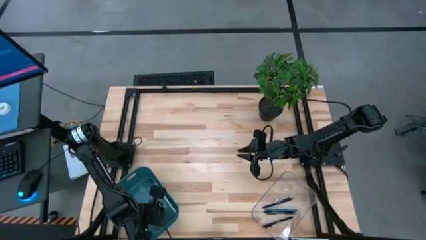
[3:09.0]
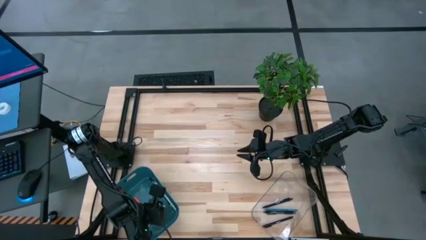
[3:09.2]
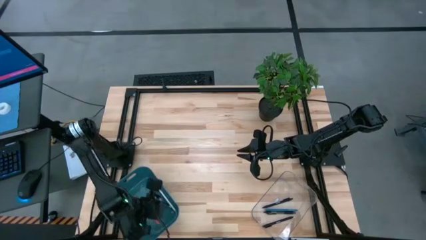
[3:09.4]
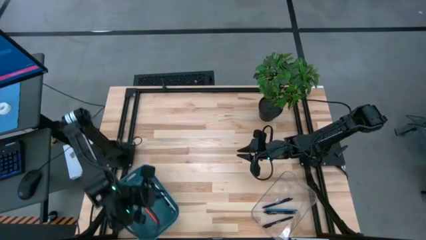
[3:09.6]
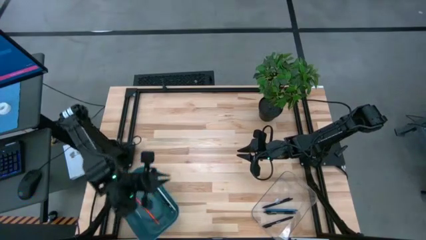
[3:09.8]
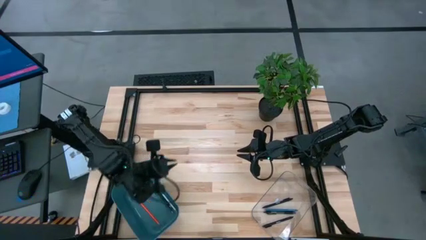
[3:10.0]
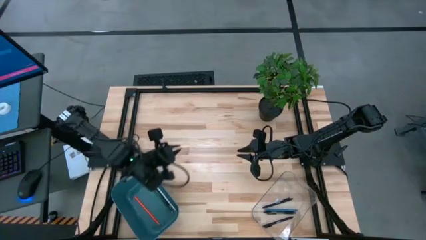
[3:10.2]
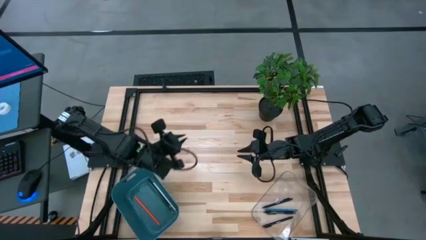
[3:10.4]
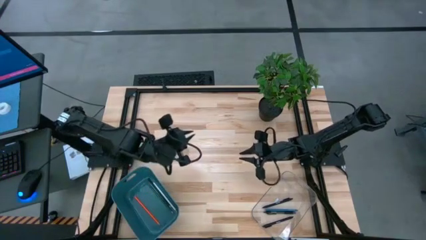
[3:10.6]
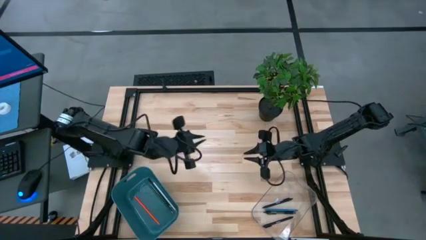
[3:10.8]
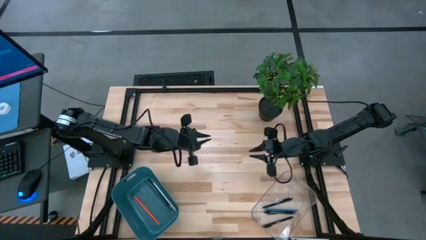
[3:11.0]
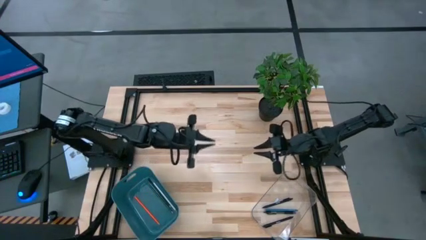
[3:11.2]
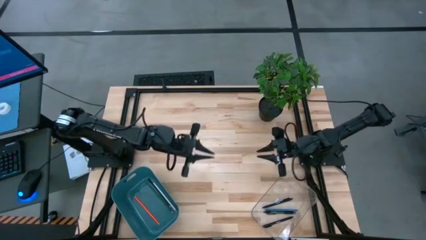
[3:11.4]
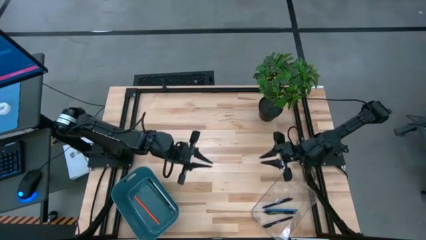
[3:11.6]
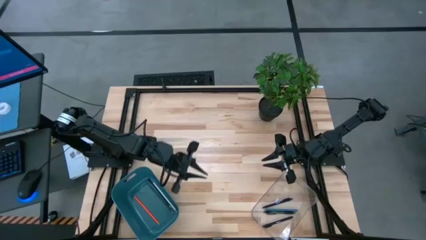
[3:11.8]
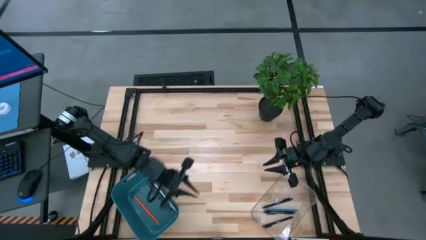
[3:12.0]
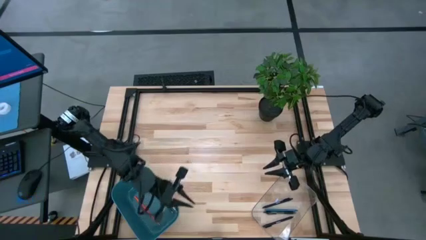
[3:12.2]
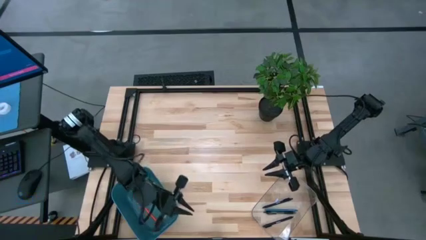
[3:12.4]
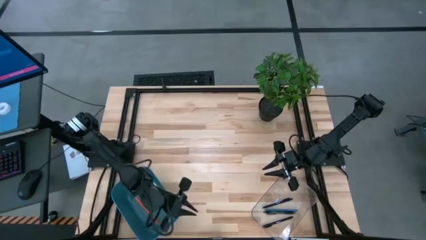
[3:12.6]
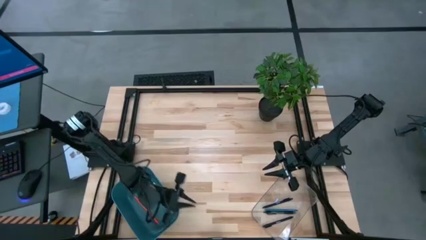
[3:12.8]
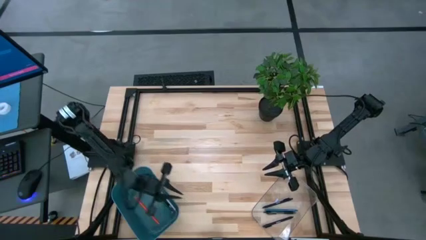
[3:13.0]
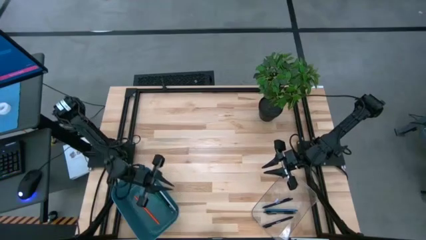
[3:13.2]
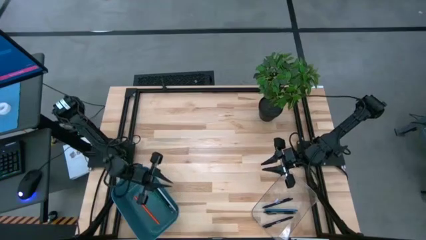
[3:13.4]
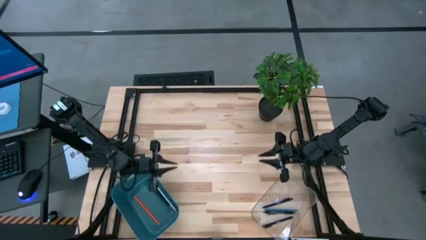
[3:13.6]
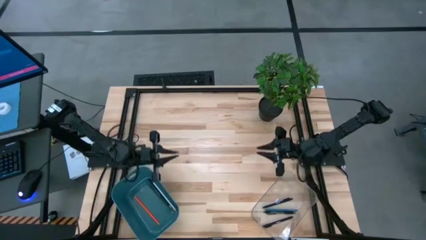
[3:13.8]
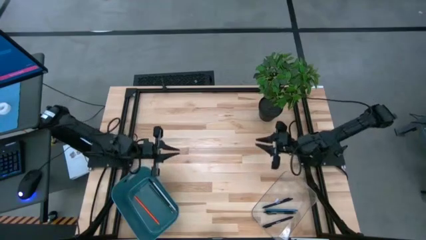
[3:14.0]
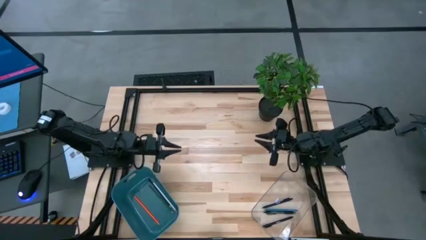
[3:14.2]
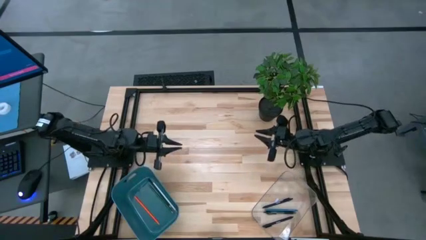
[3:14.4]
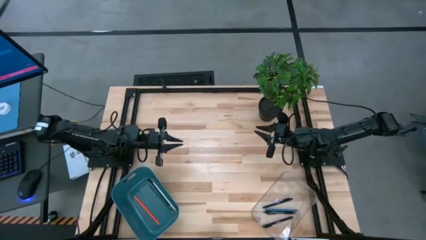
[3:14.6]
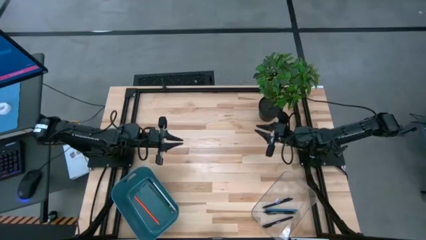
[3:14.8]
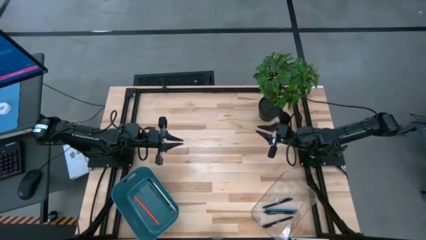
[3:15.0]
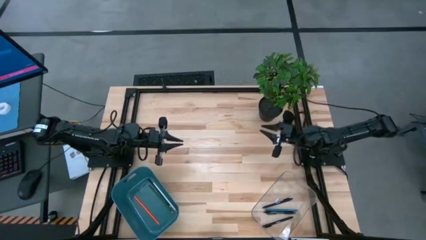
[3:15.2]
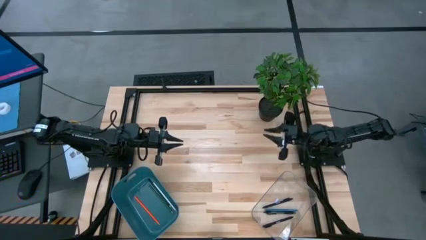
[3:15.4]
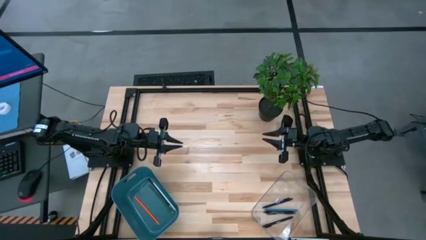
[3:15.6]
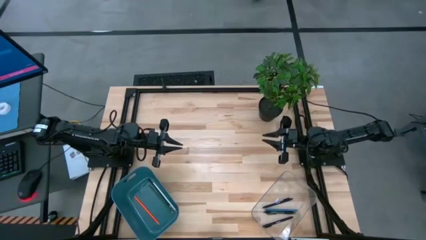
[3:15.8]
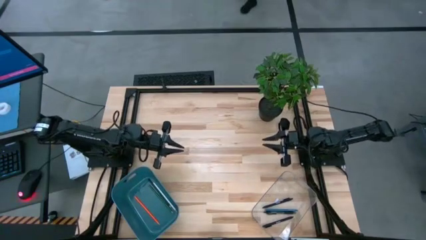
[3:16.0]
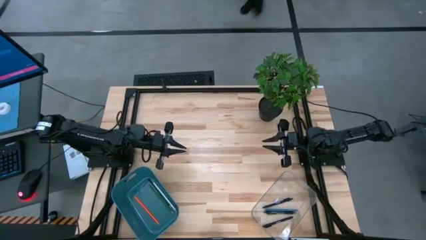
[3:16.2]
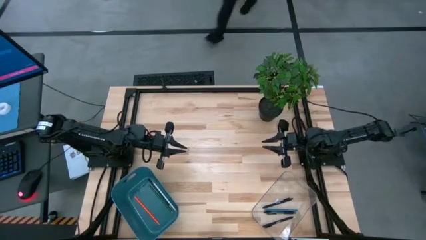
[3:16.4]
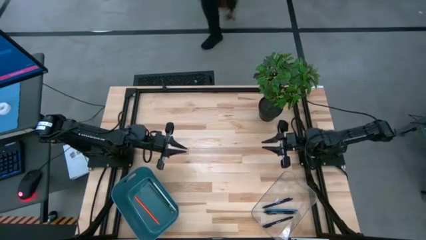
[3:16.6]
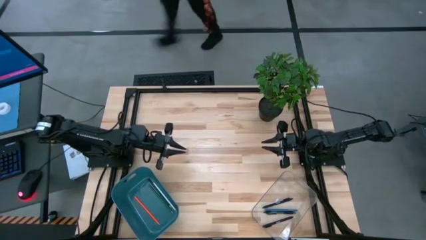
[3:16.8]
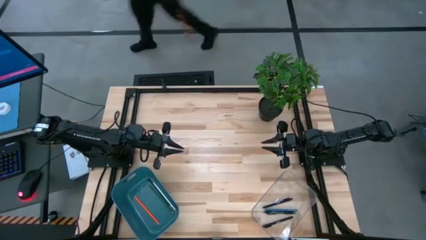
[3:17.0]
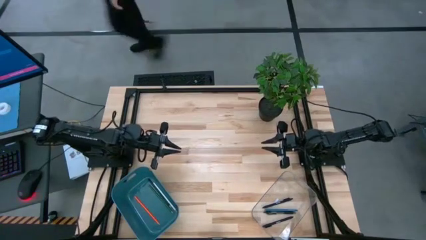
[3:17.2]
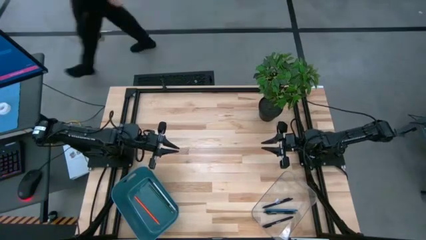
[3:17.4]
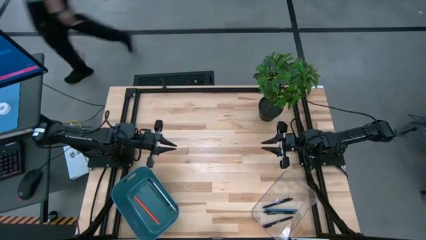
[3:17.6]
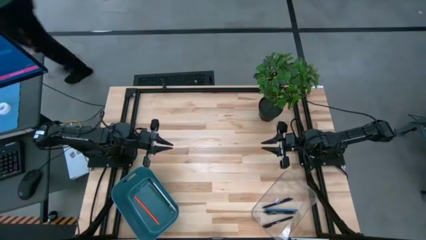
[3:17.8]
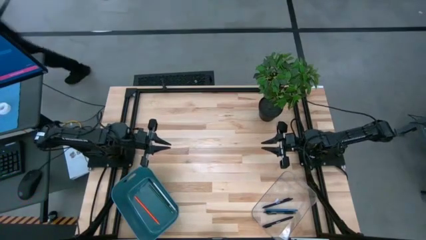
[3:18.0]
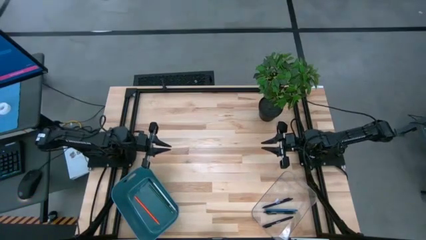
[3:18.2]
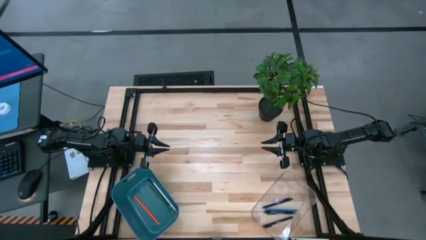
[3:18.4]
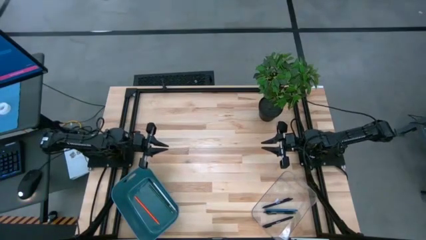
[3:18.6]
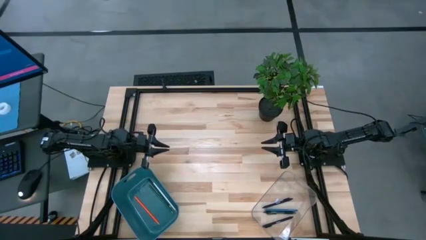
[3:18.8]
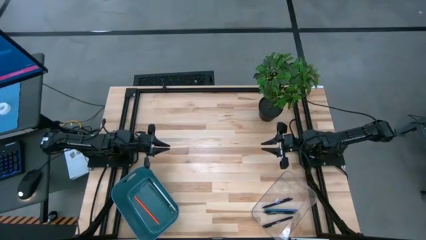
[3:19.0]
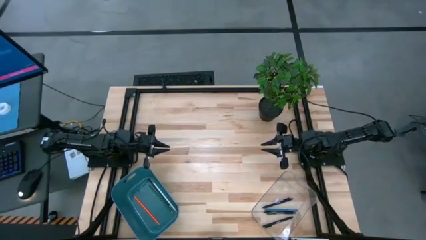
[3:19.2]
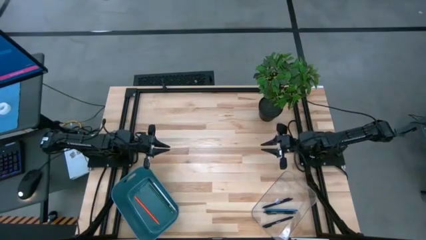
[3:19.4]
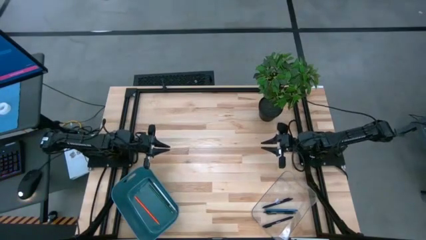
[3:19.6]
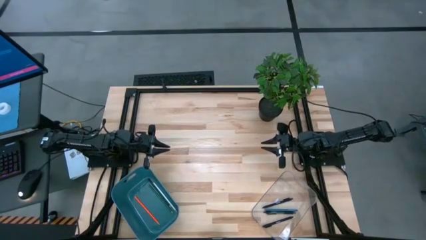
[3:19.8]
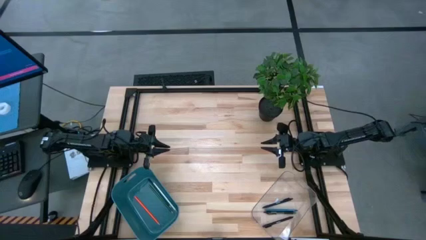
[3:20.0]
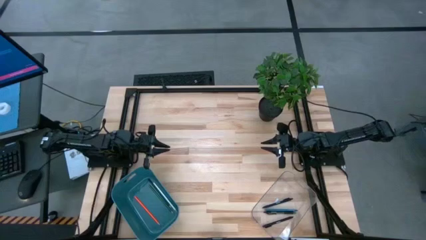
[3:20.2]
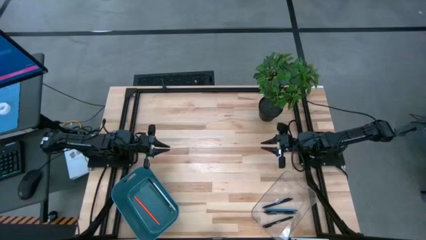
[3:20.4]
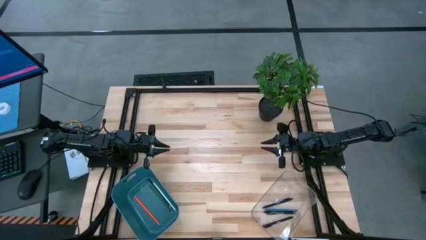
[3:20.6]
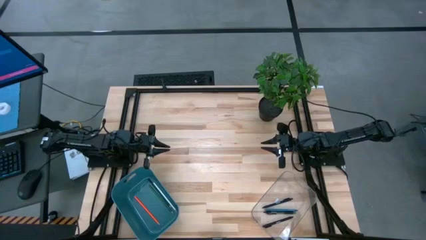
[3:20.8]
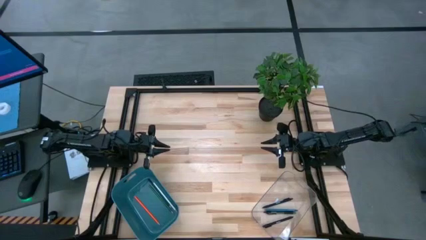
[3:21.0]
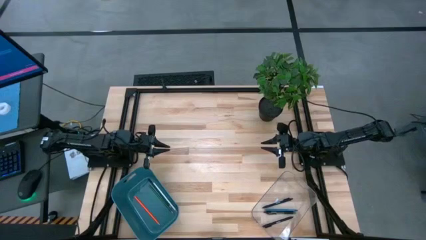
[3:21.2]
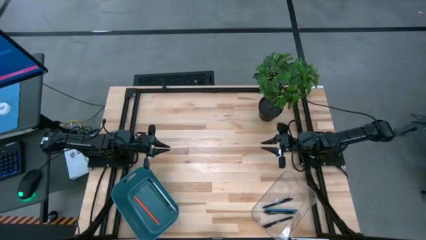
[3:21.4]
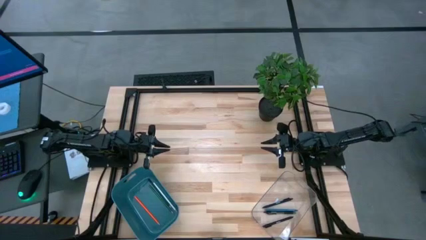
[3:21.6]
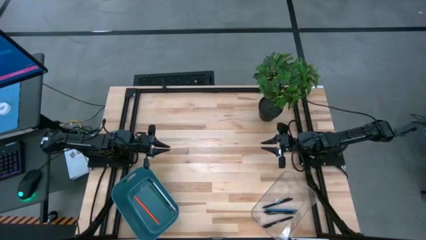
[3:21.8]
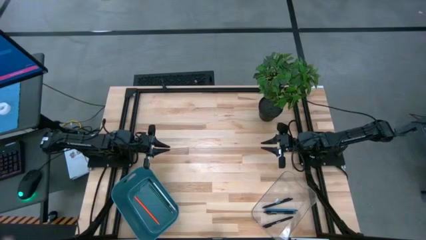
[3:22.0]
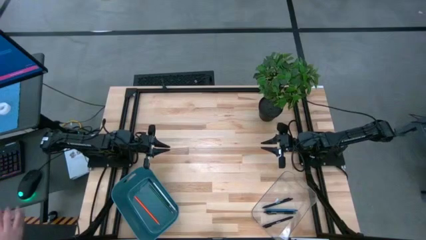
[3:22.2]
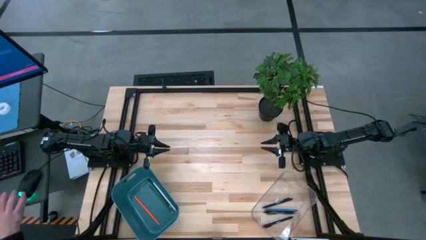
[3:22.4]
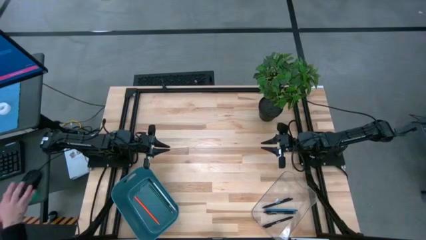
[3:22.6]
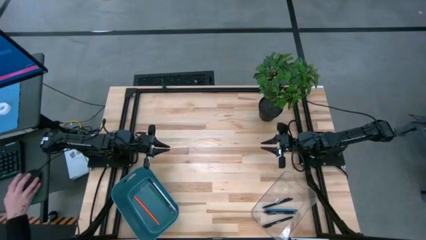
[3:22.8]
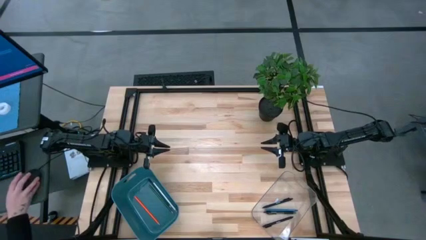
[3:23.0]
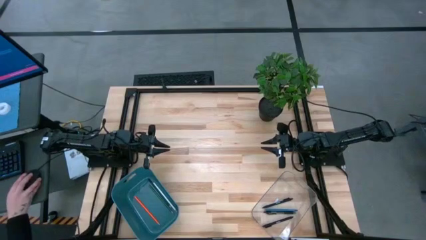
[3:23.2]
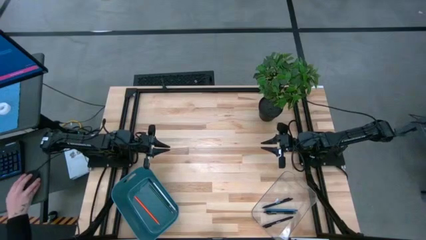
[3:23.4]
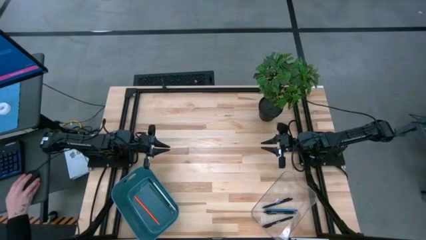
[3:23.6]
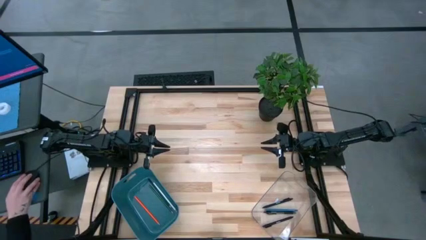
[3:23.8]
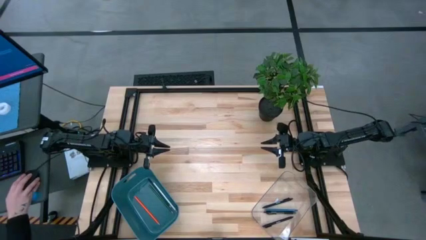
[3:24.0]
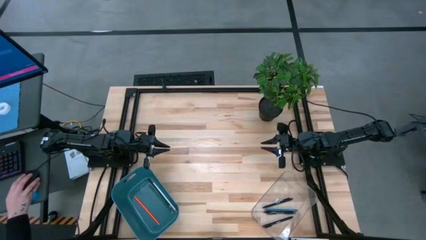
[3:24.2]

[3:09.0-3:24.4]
Task: Sort pens & pencils
Return to Home Position
